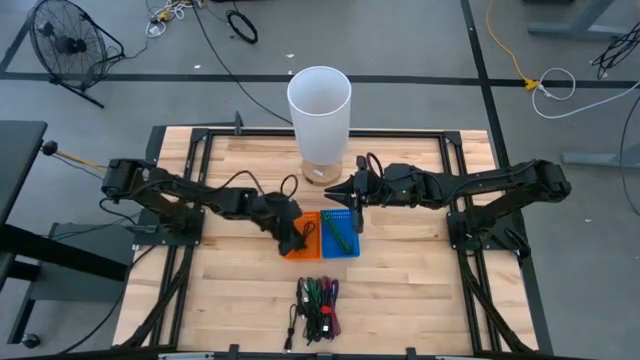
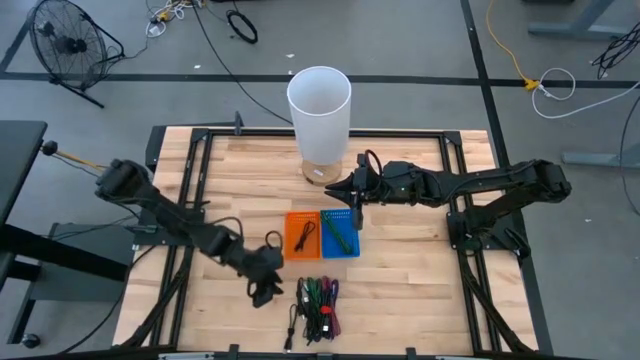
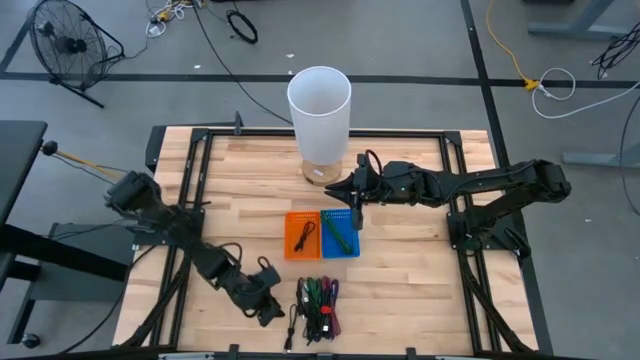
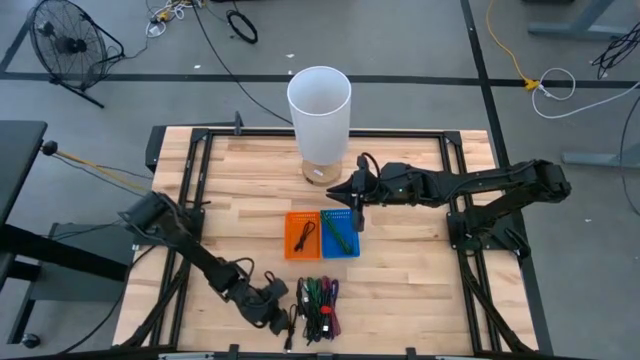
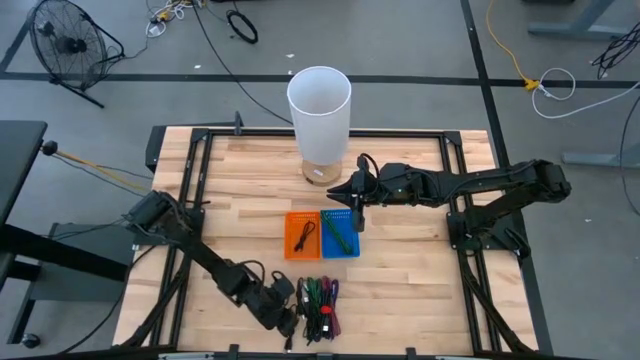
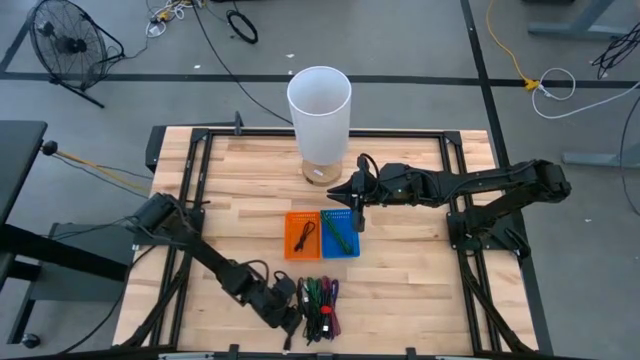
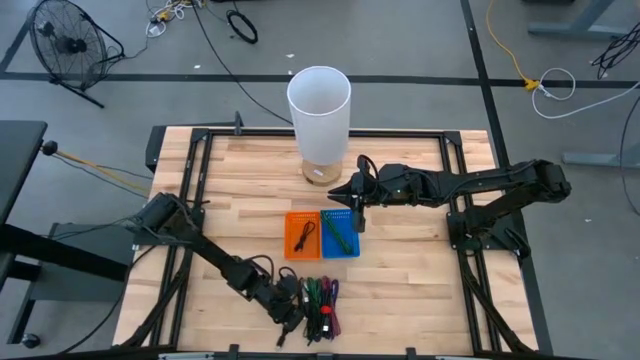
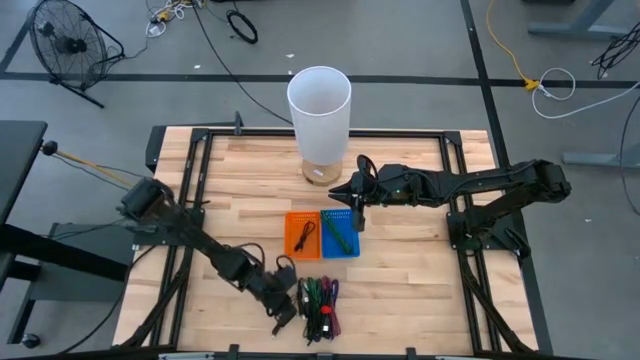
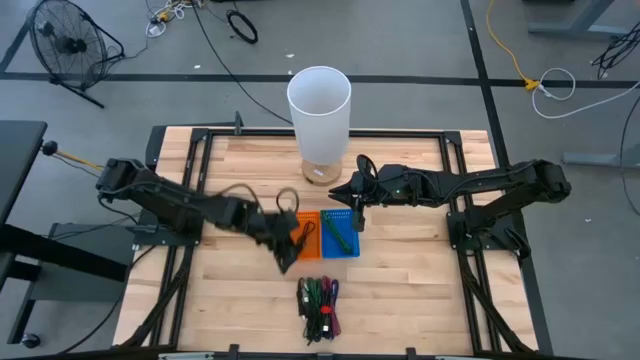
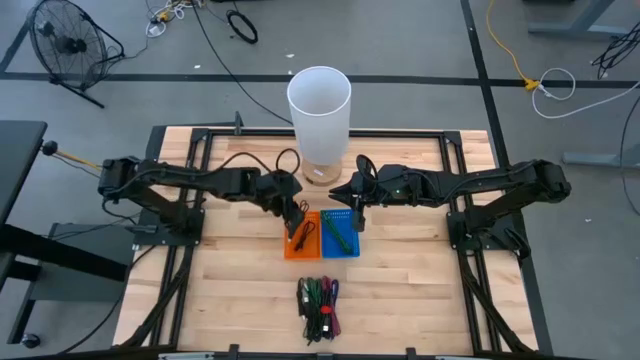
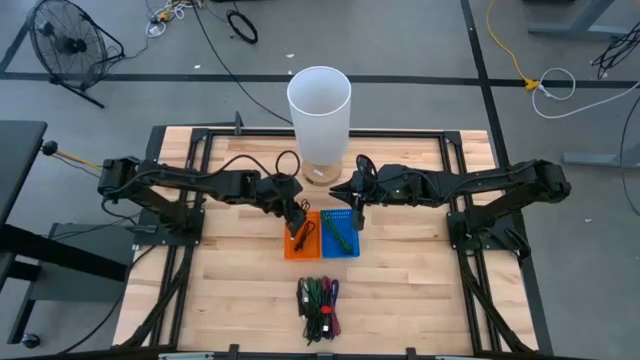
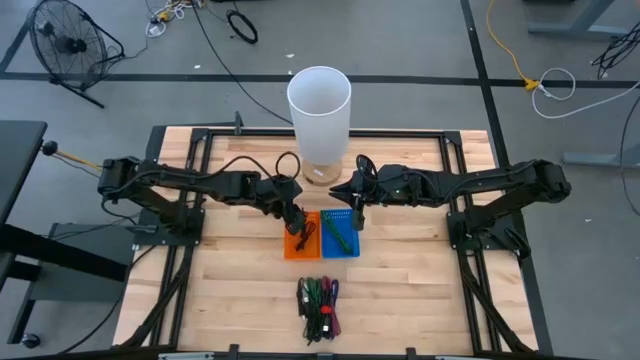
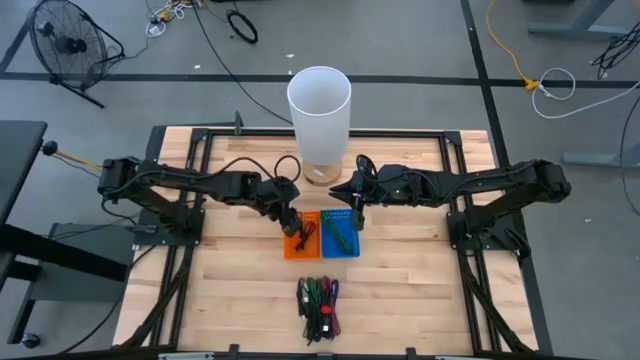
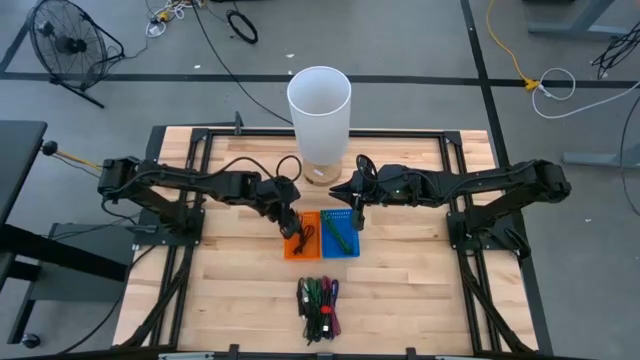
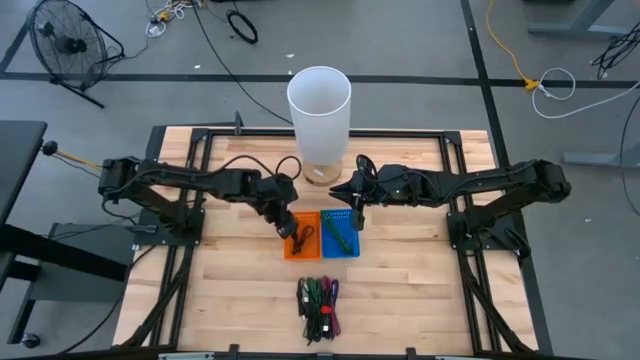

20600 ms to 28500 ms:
Task: Pick & Place USB Port
Put the black USB cable into the orange bin

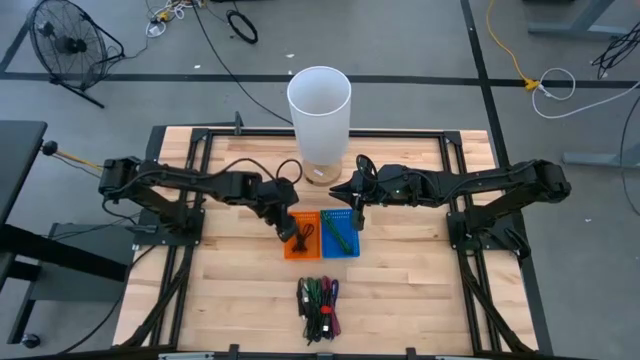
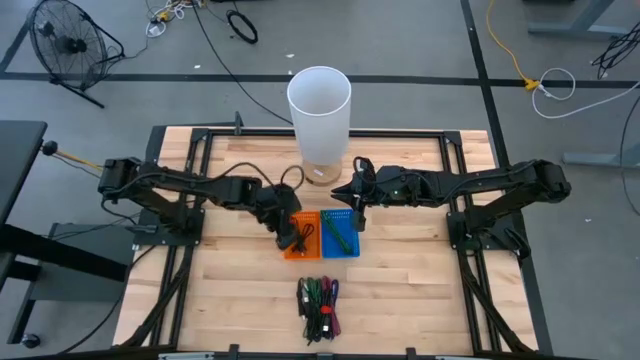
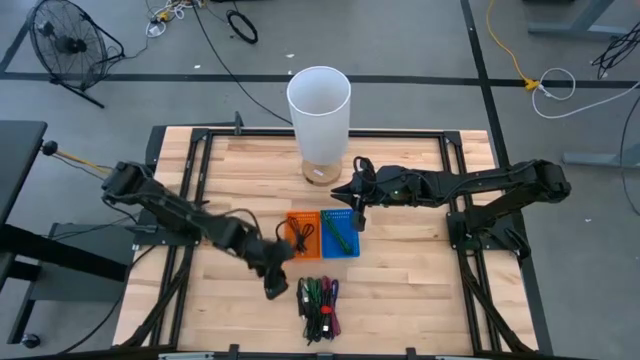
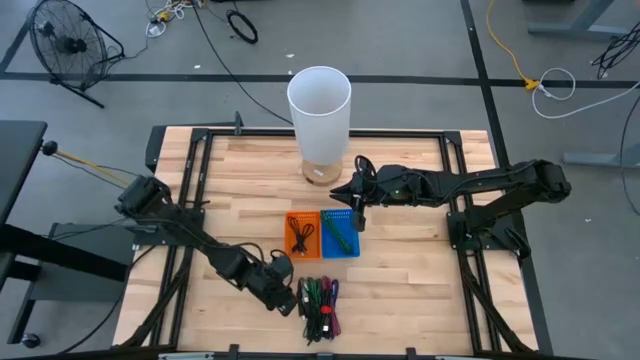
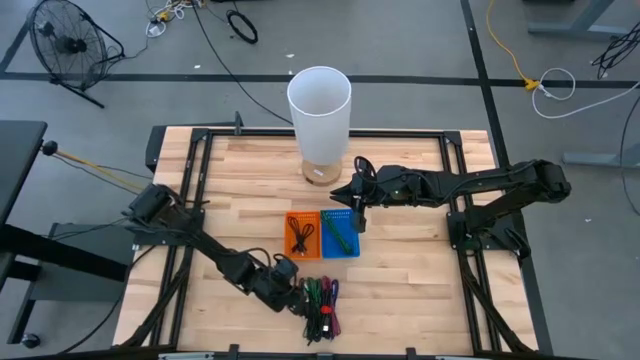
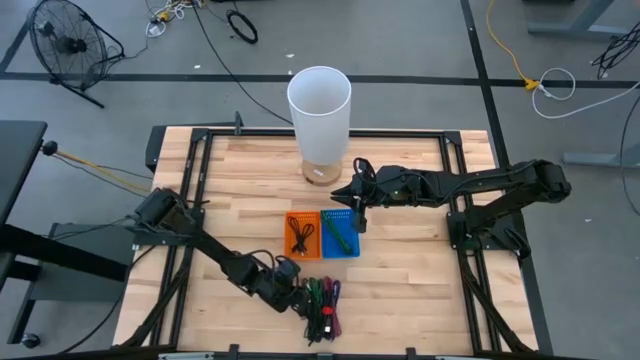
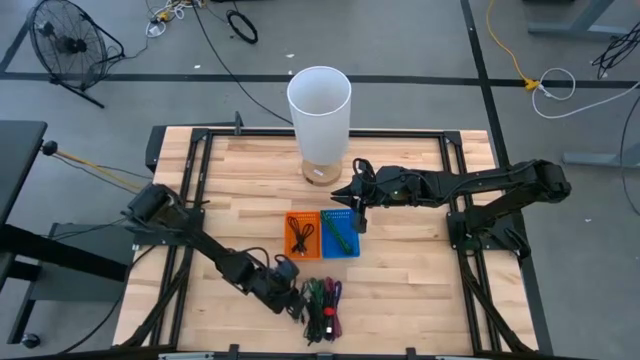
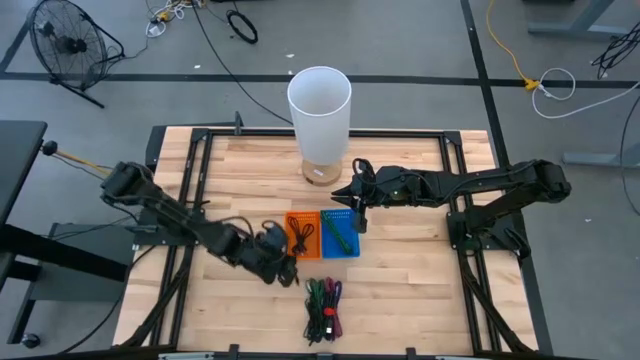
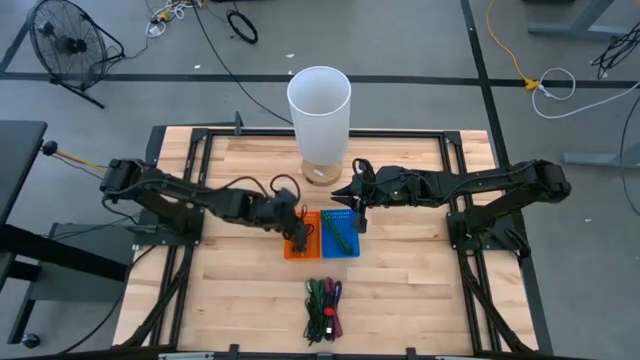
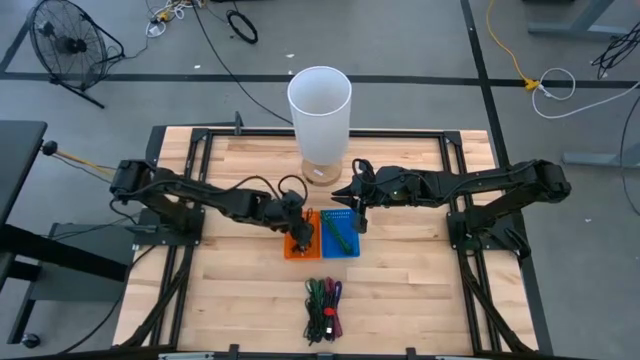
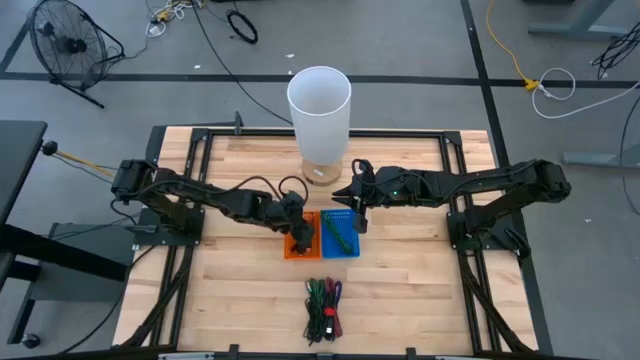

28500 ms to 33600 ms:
Put the black USB cable into the orange bin

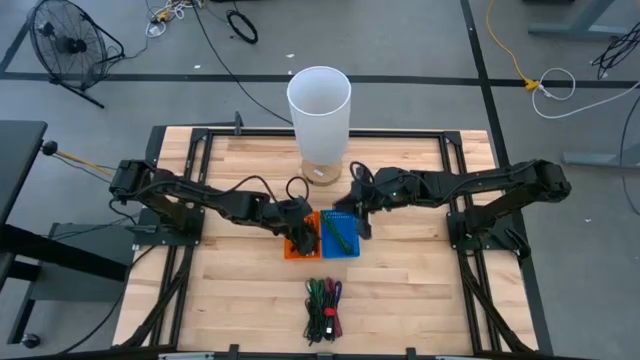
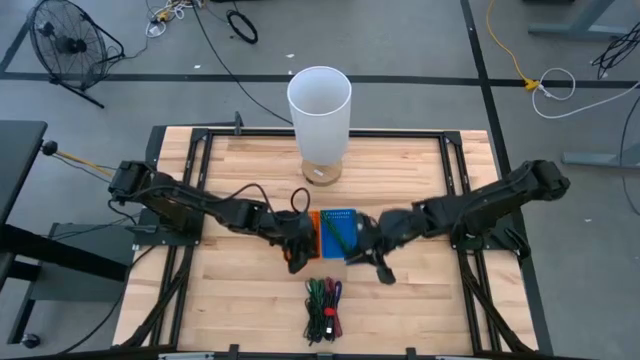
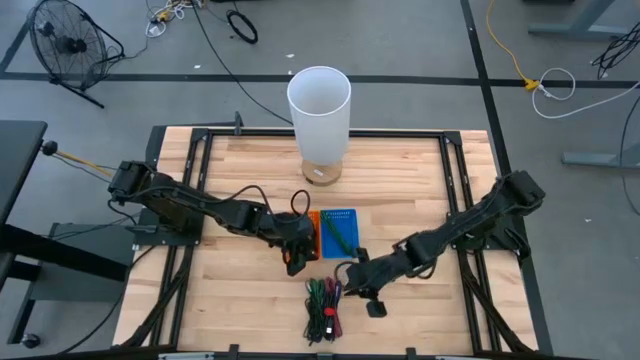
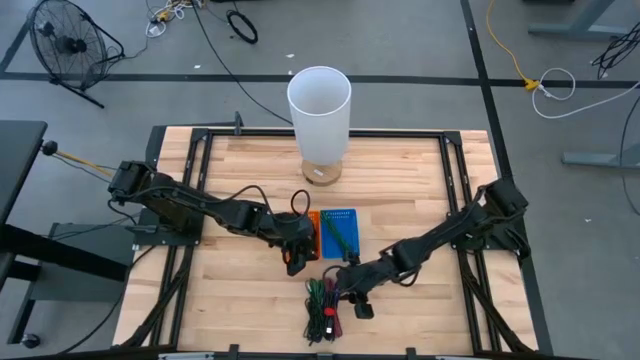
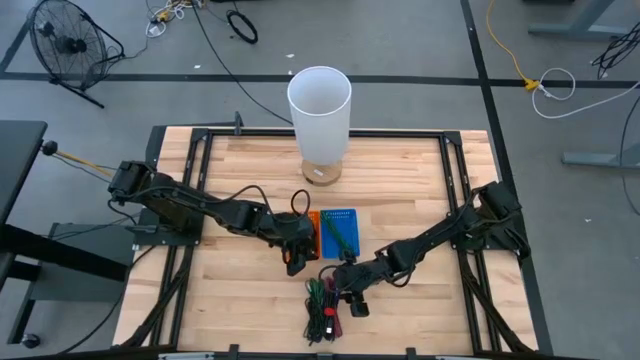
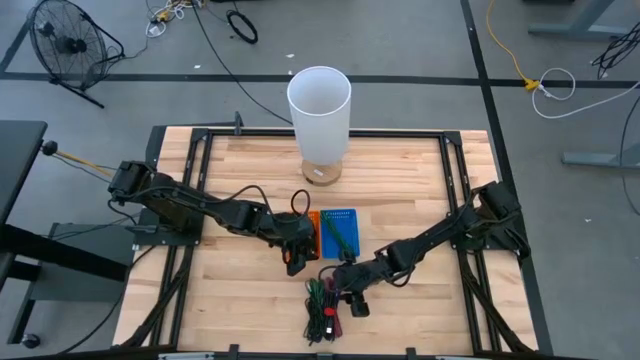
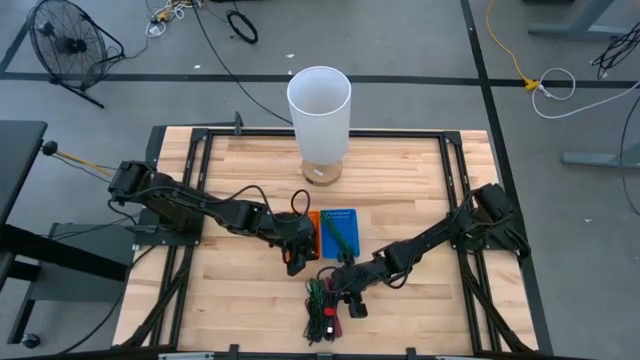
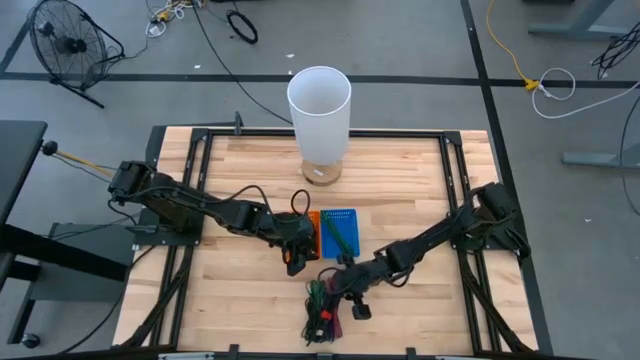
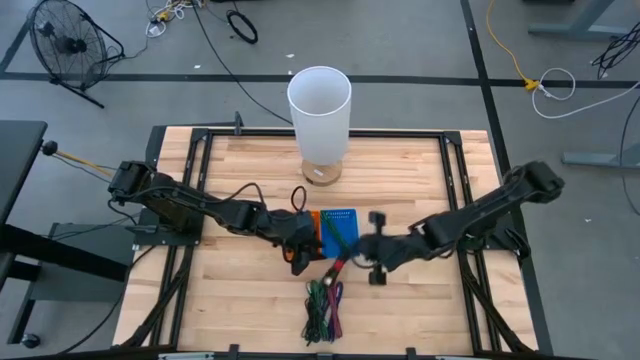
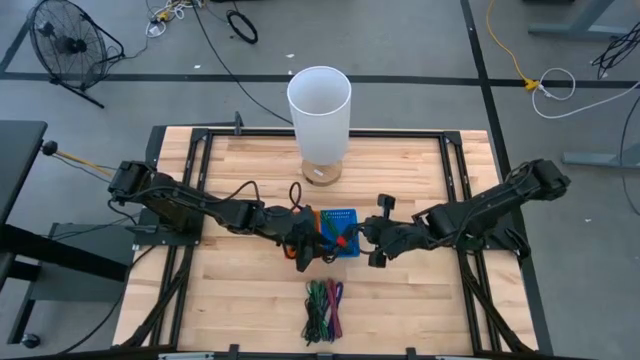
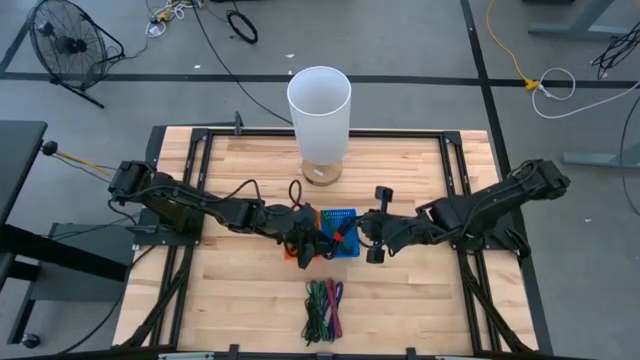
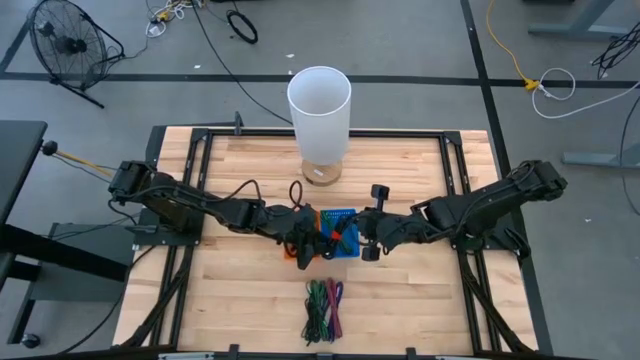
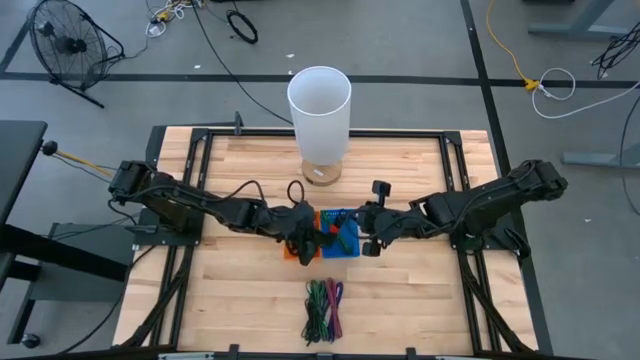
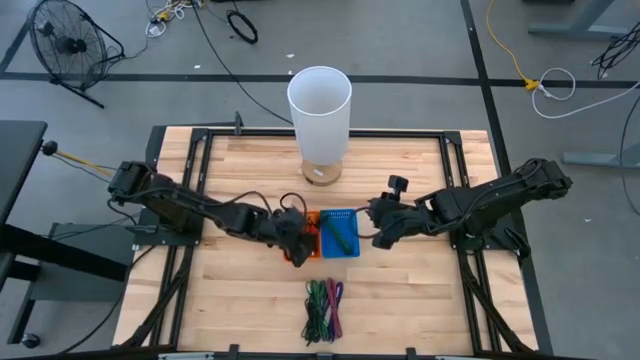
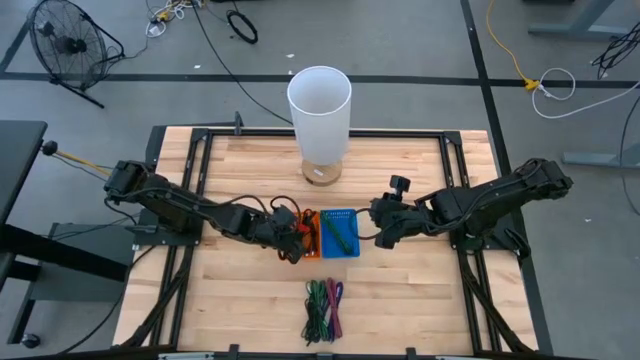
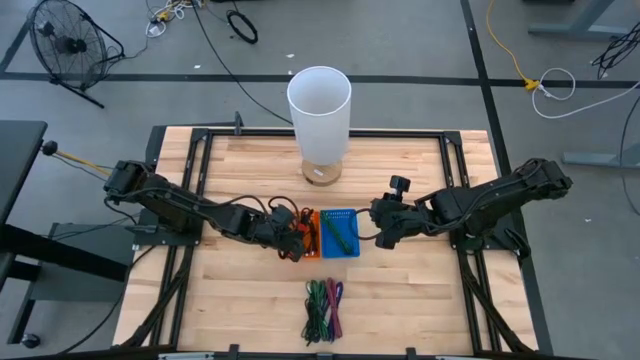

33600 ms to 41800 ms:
Put the black USB cable into the orange bin
